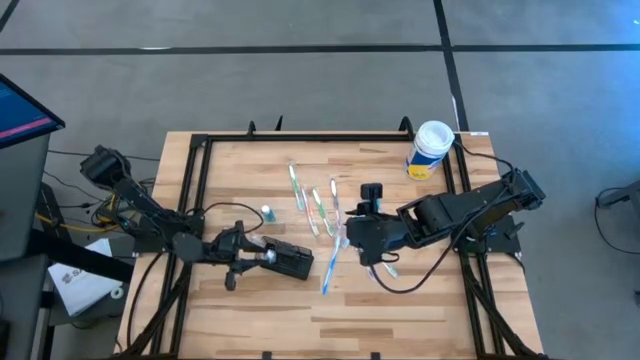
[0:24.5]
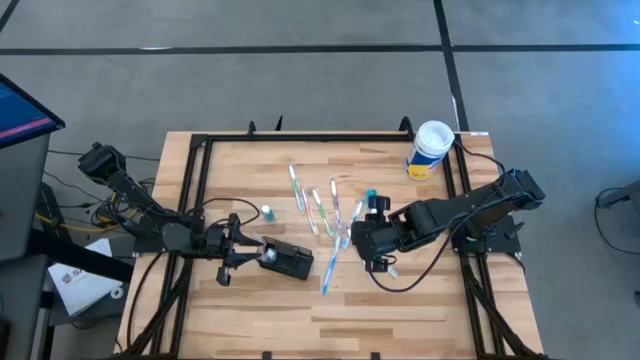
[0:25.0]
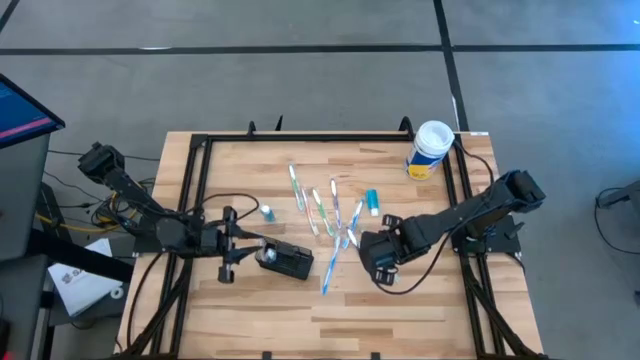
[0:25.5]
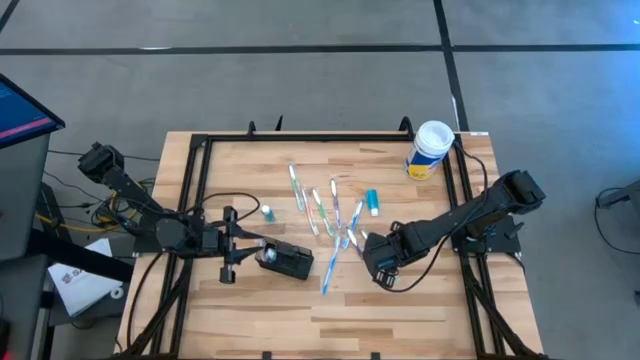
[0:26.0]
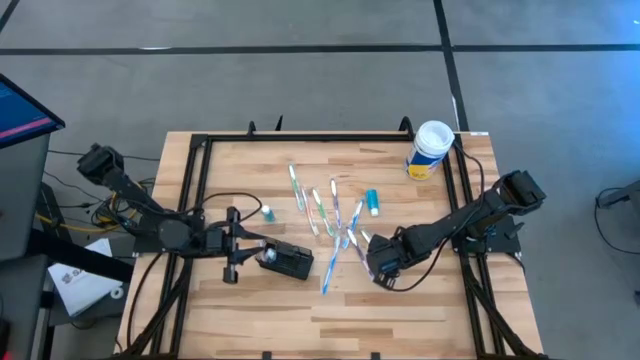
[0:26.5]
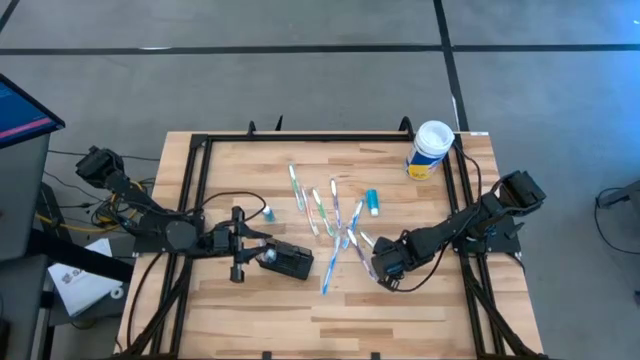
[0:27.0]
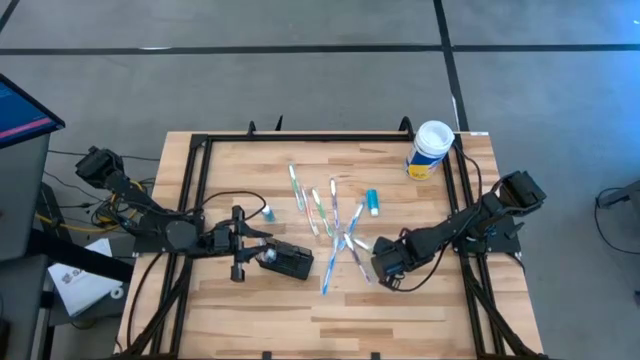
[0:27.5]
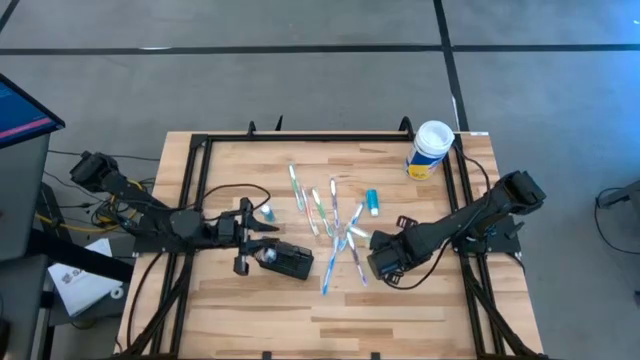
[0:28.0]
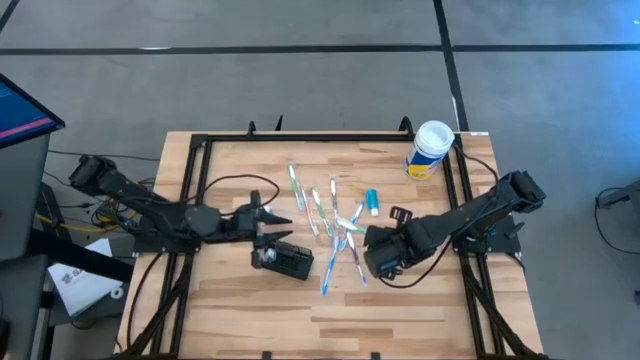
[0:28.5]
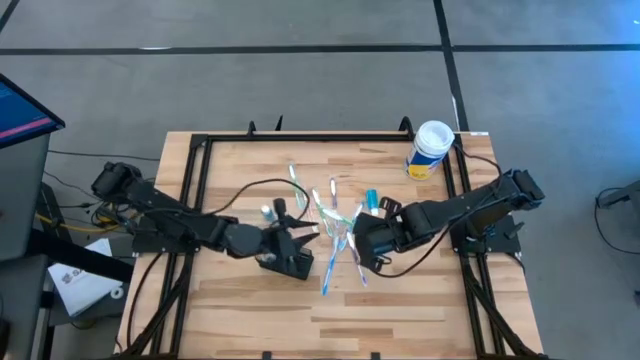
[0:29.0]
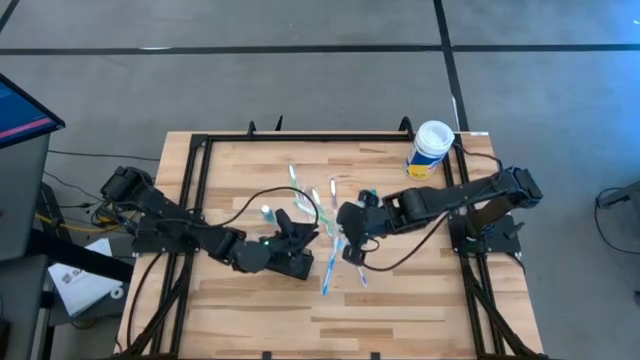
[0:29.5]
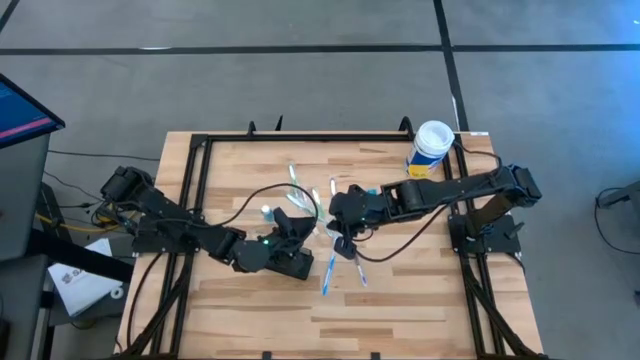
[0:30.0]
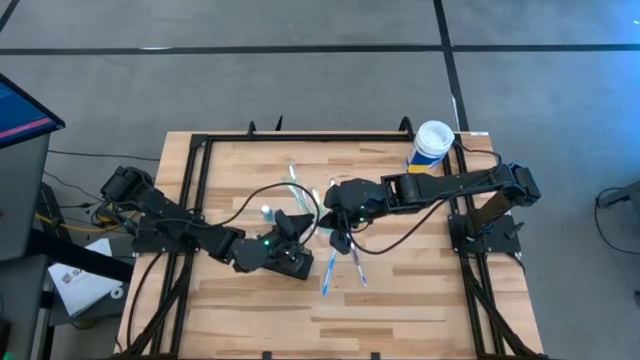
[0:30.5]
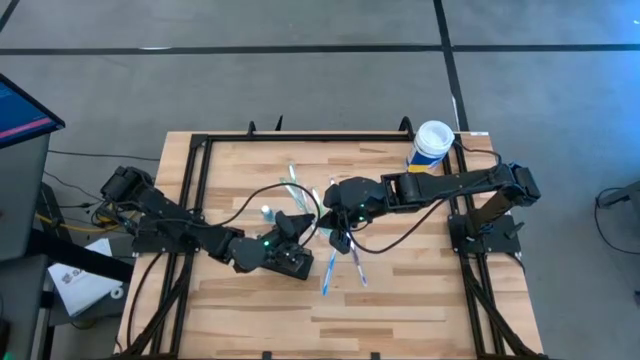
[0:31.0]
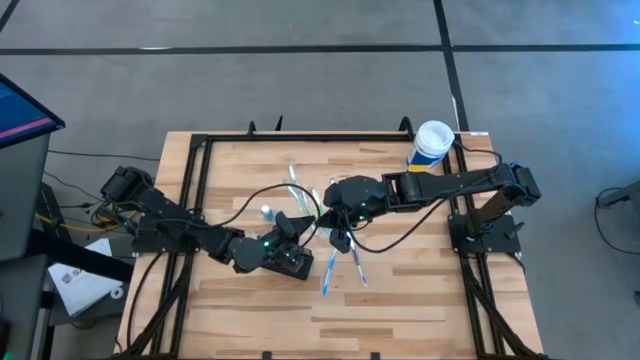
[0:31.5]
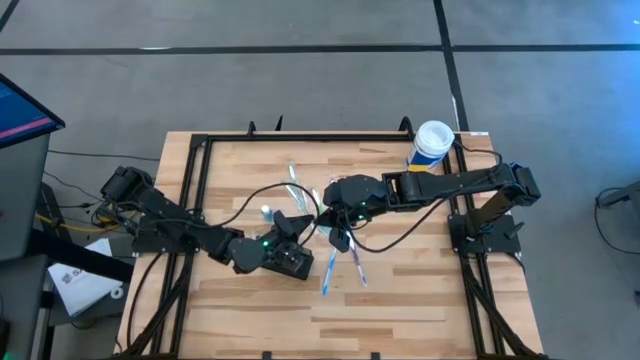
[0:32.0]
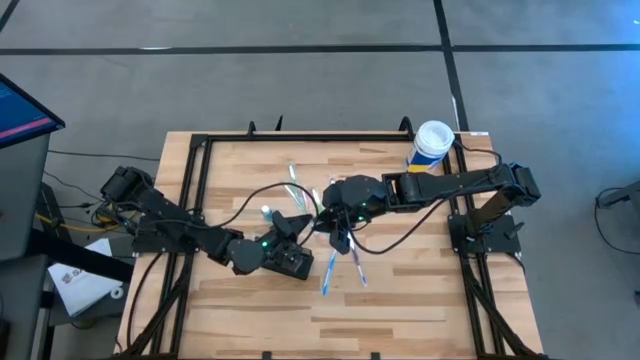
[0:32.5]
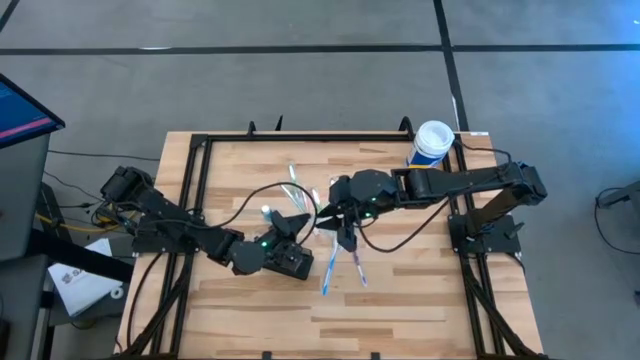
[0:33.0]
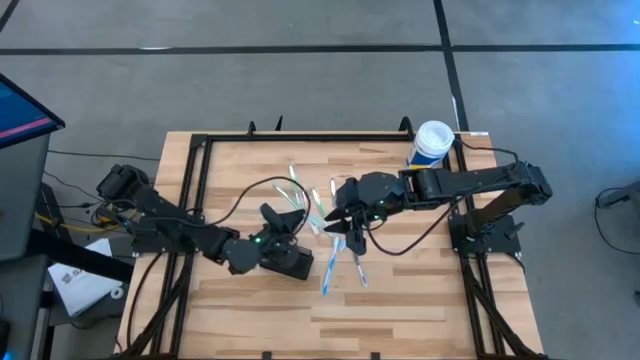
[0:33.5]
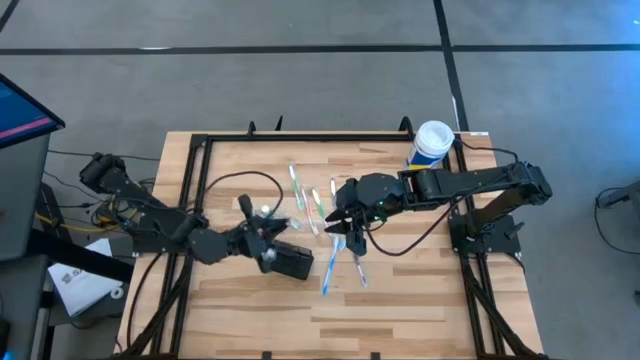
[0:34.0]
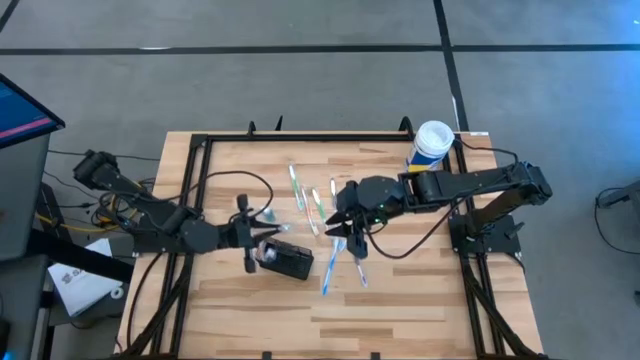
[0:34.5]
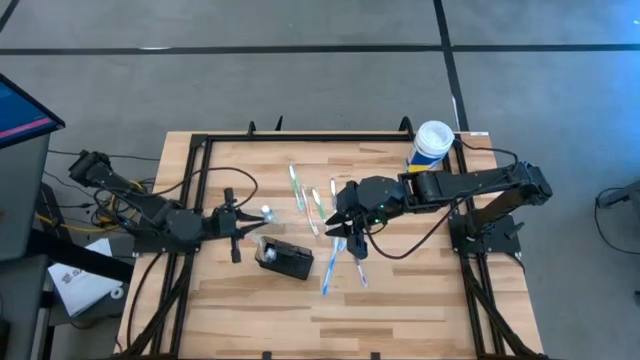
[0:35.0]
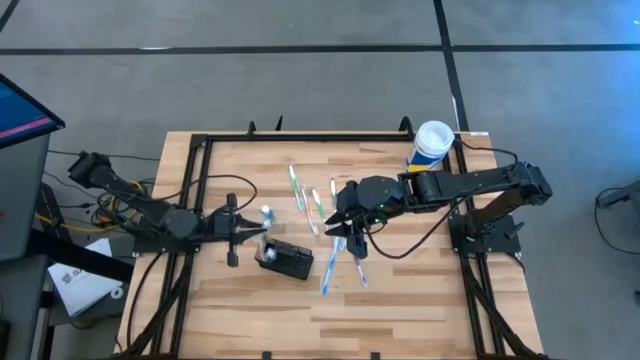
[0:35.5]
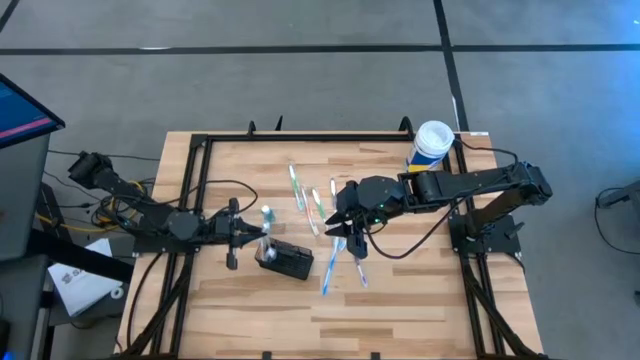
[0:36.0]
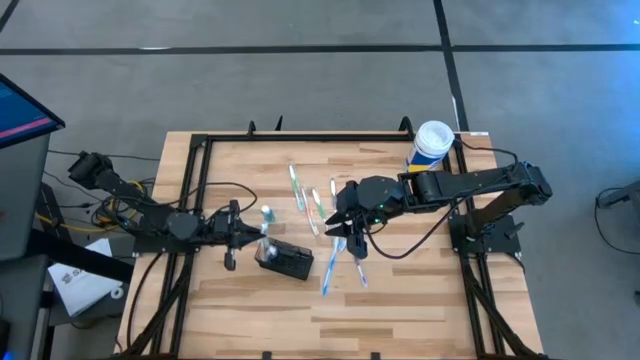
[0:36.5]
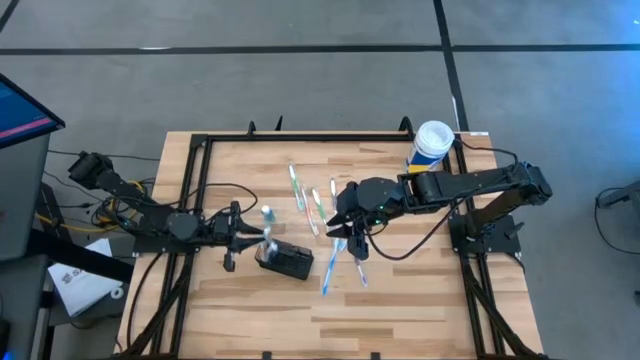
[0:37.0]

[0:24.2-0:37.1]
Task: Pick & Place toothbrushing station
Put the bottom green toothbrush into the wire organizer

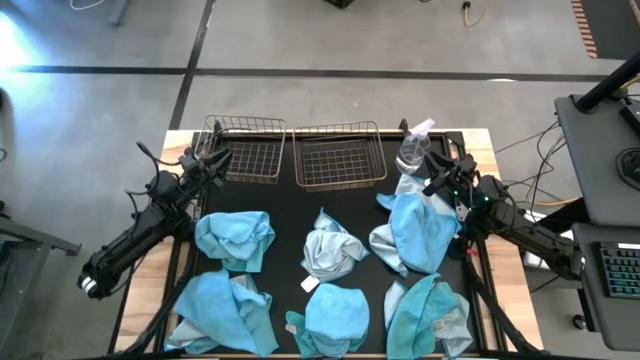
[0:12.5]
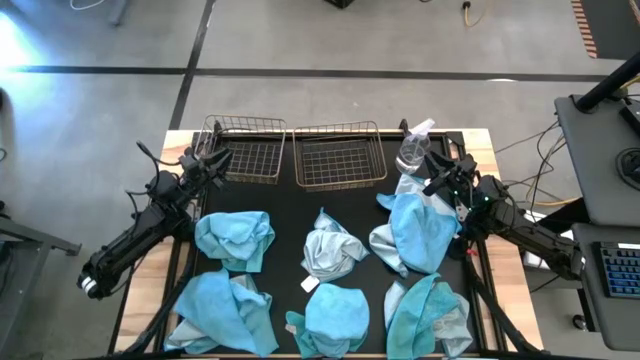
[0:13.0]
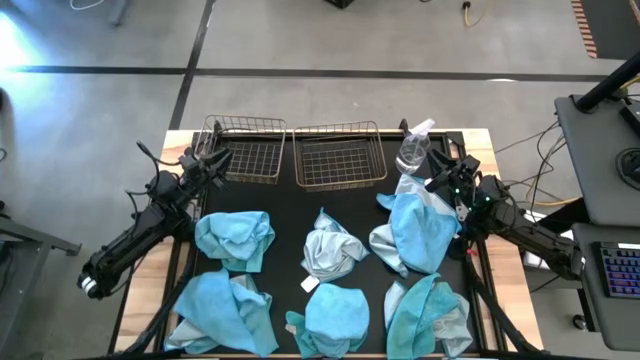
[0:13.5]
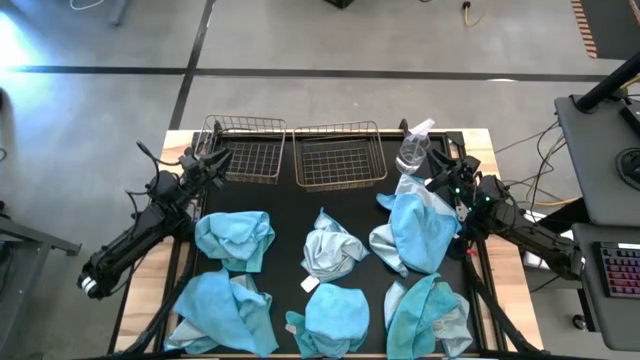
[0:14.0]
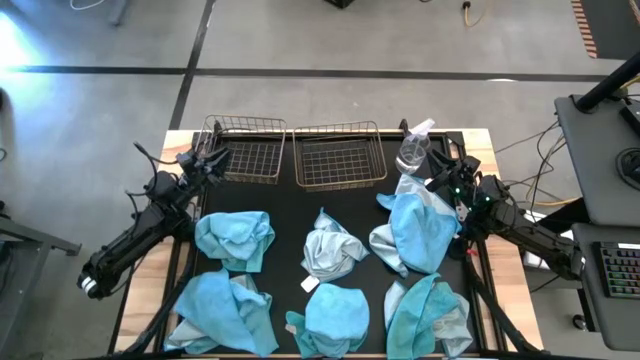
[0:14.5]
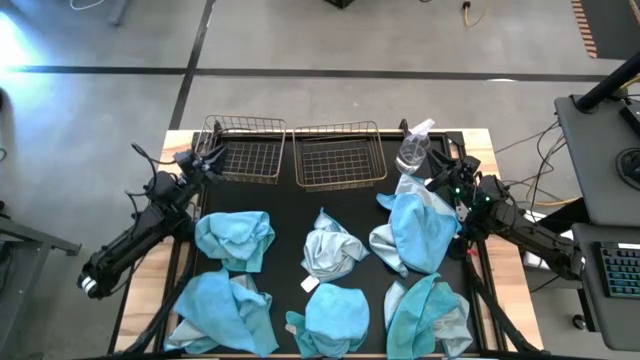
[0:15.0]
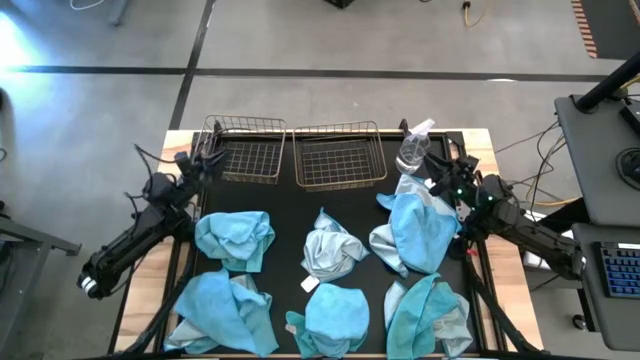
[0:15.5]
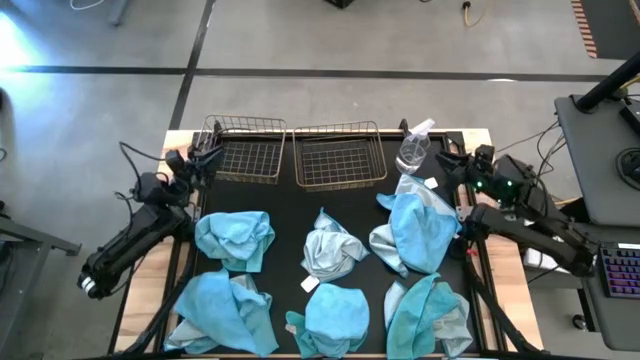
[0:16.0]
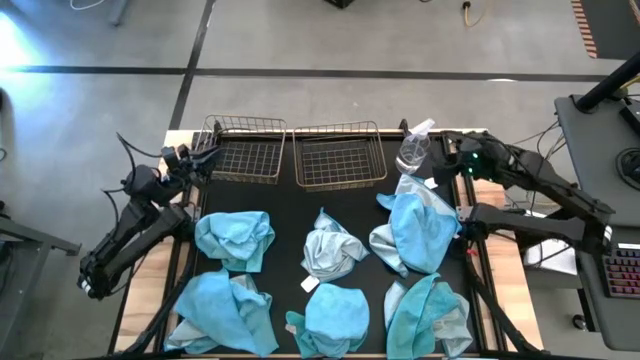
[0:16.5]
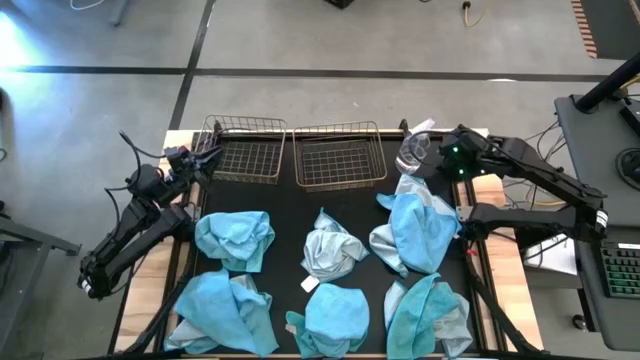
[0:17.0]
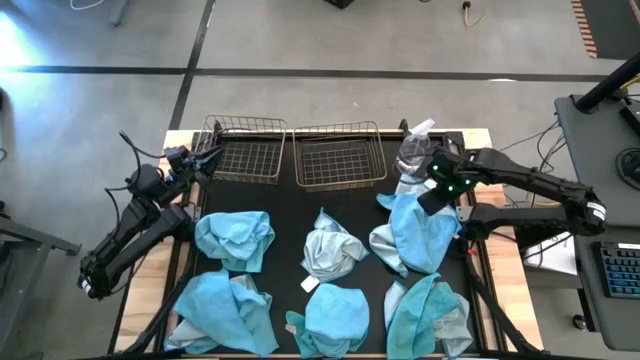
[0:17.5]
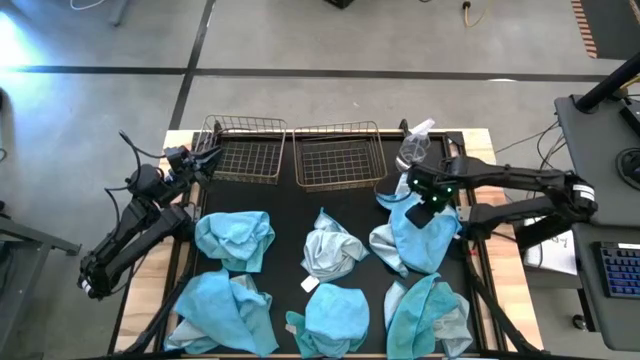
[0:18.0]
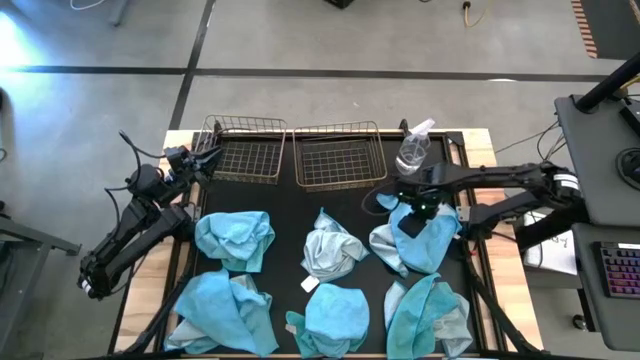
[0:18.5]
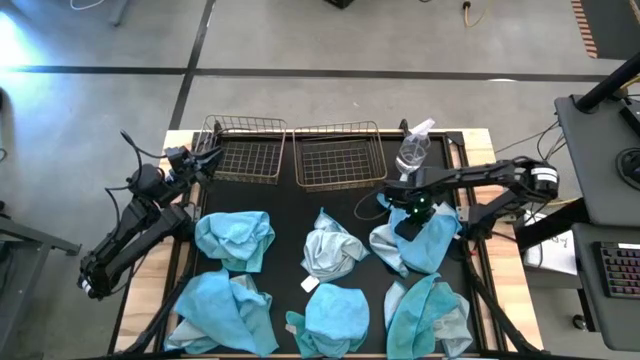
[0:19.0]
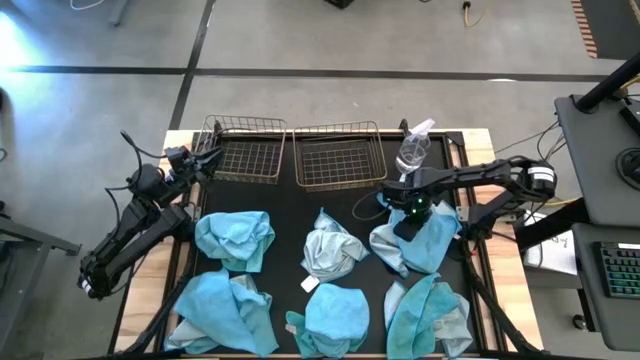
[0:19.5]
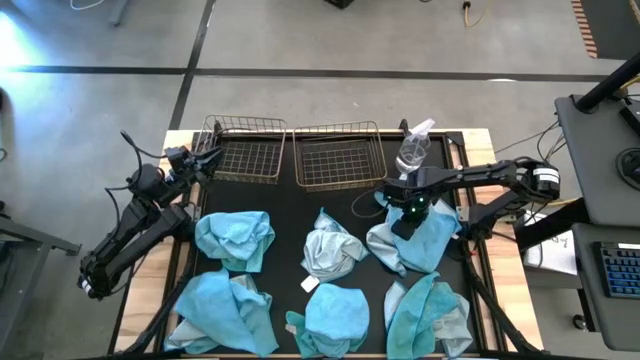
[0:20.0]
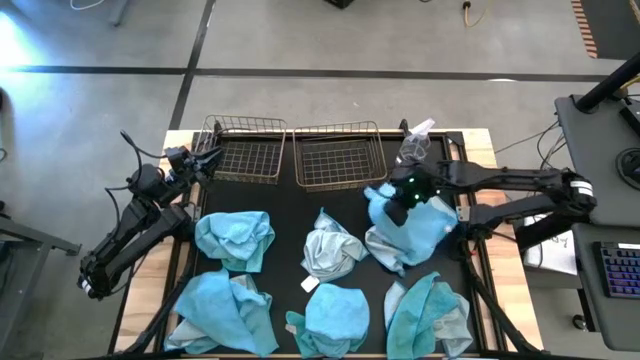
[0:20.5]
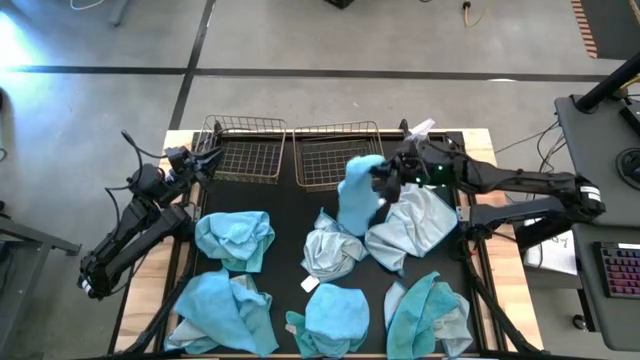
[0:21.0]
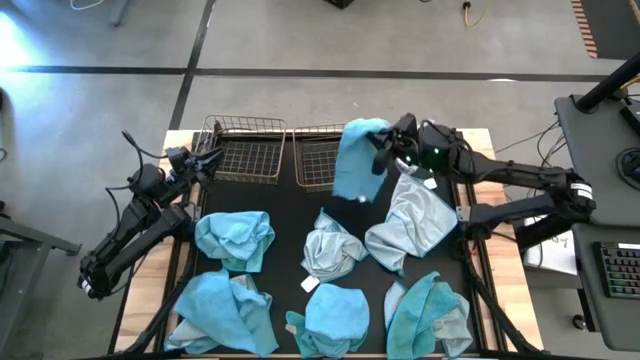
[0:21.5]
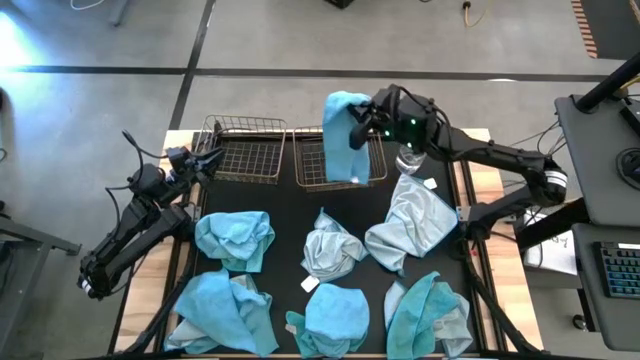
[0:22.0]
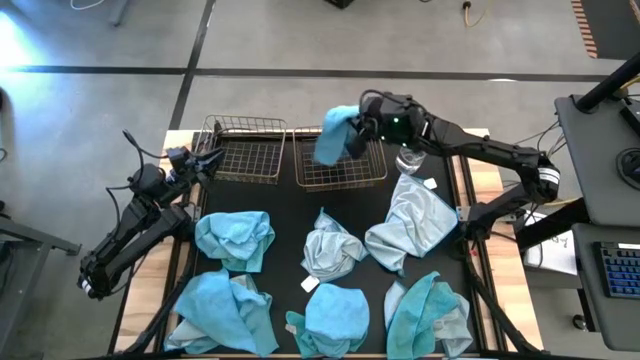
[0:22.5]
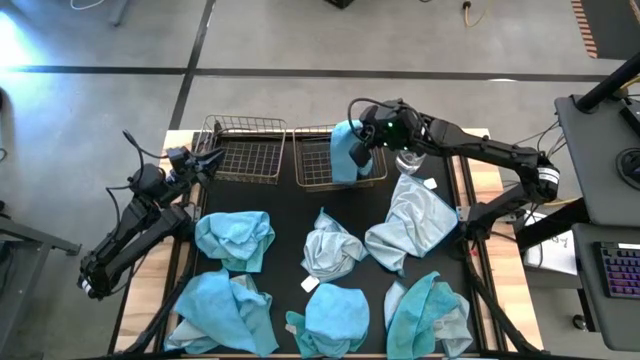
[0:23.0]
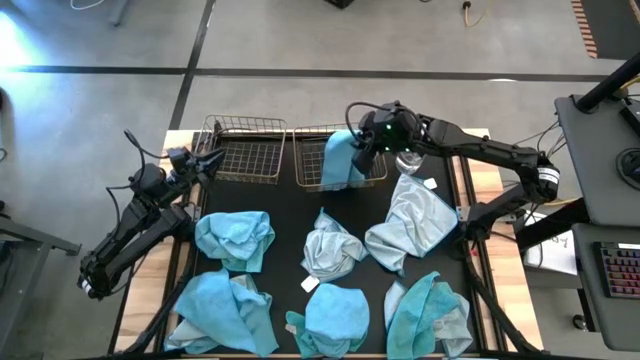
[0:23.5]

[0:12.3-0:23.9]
Task: Sort microfiber towel by color & place in baskets
Put the blue microfiber towel into the right wire basket
